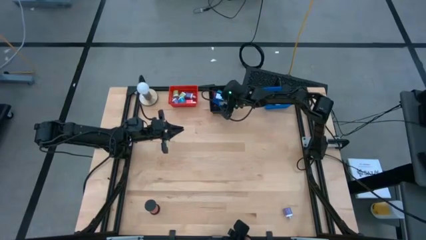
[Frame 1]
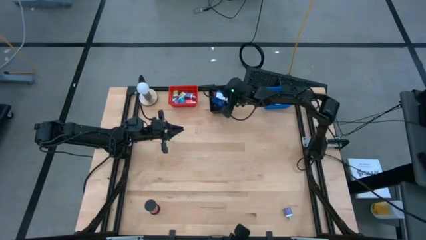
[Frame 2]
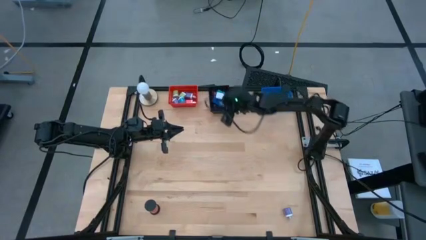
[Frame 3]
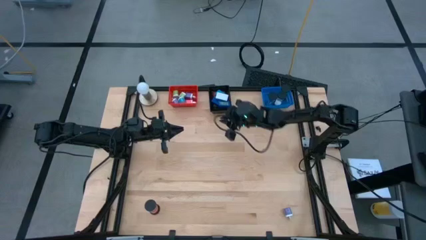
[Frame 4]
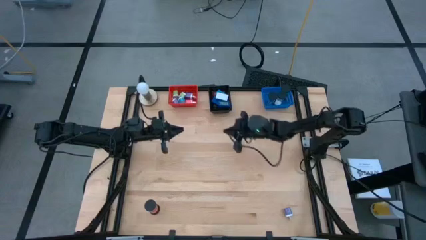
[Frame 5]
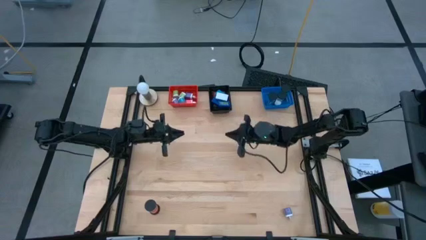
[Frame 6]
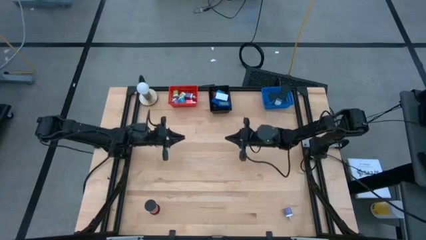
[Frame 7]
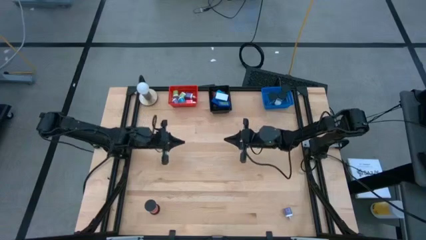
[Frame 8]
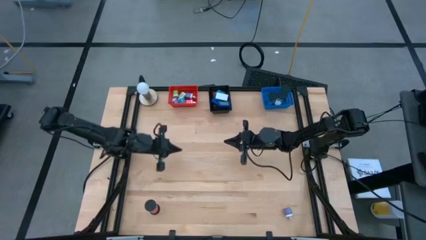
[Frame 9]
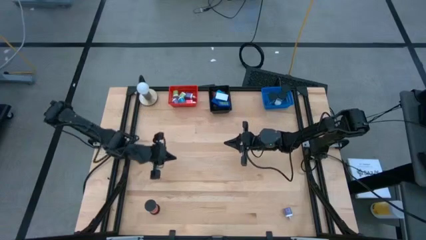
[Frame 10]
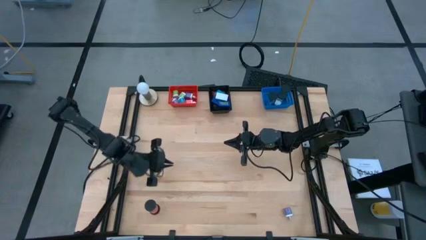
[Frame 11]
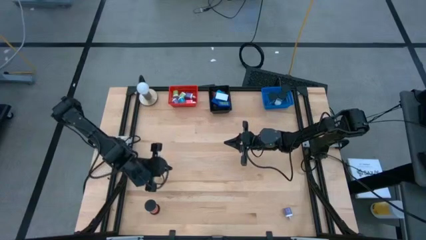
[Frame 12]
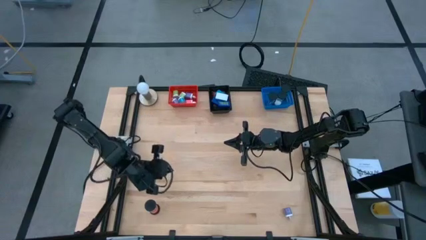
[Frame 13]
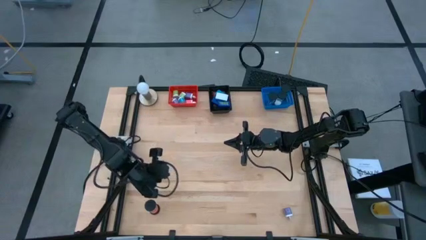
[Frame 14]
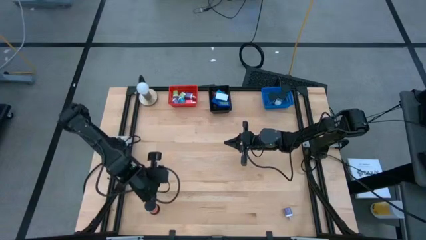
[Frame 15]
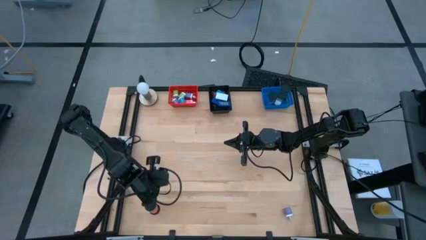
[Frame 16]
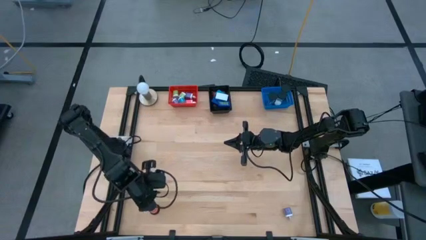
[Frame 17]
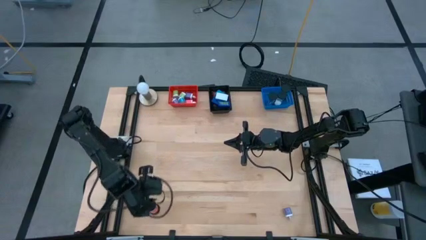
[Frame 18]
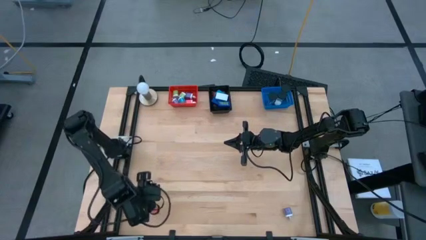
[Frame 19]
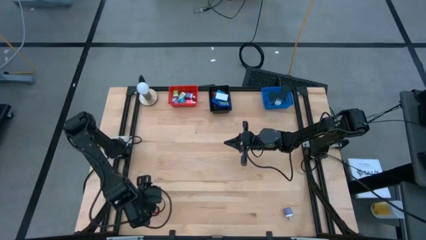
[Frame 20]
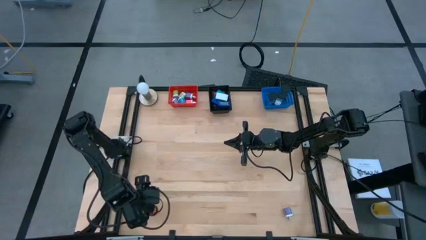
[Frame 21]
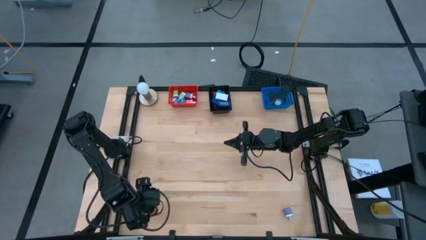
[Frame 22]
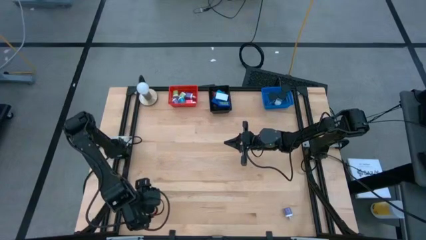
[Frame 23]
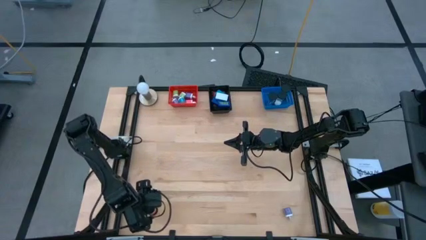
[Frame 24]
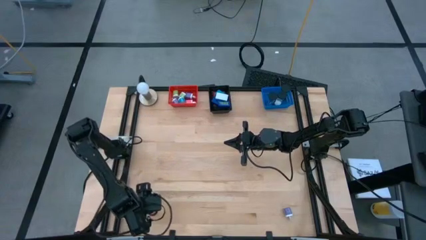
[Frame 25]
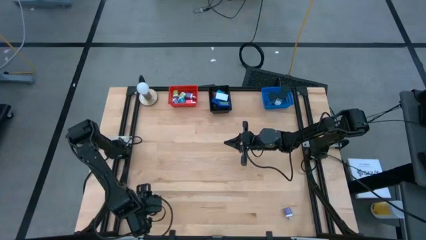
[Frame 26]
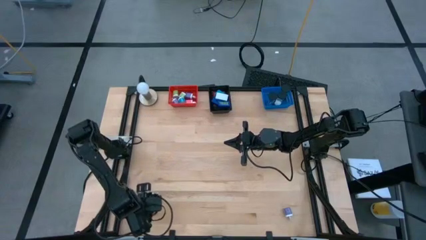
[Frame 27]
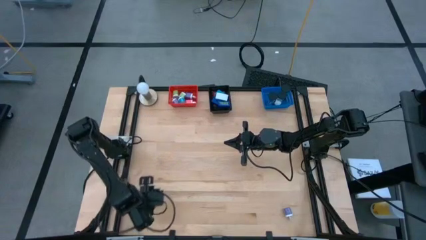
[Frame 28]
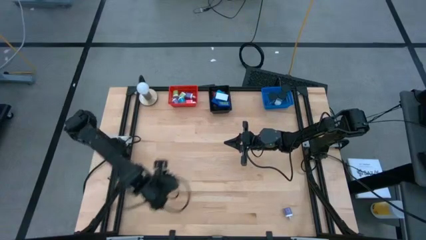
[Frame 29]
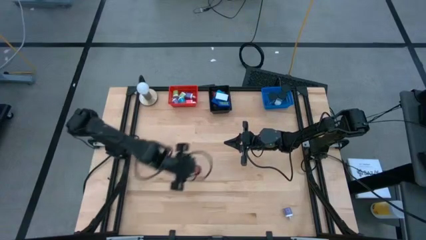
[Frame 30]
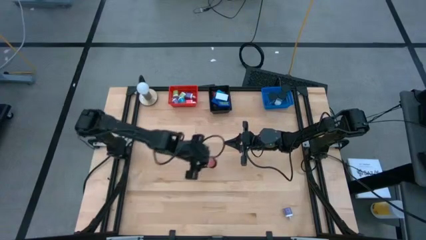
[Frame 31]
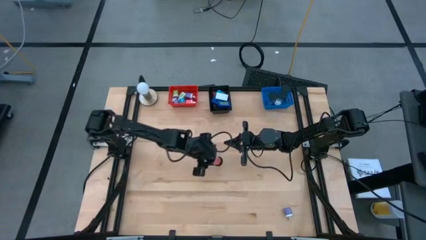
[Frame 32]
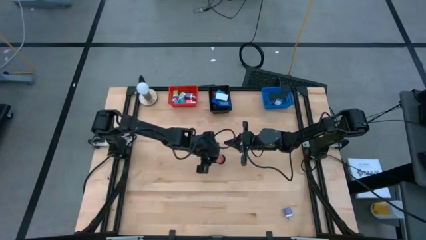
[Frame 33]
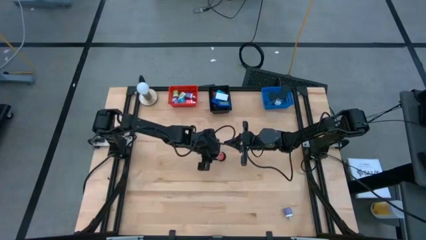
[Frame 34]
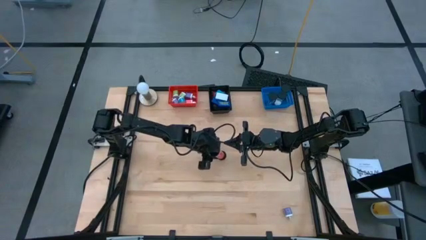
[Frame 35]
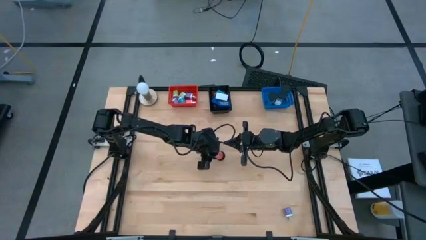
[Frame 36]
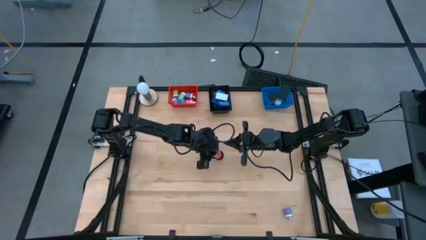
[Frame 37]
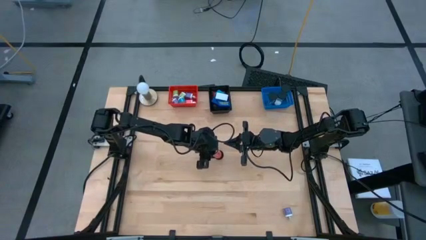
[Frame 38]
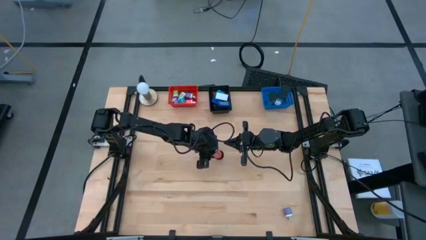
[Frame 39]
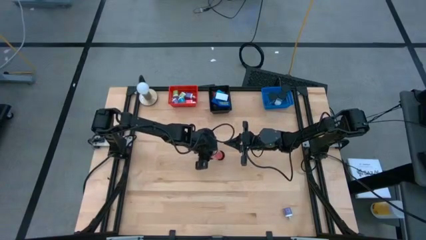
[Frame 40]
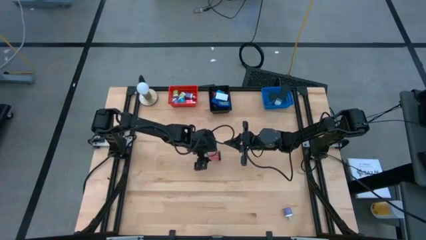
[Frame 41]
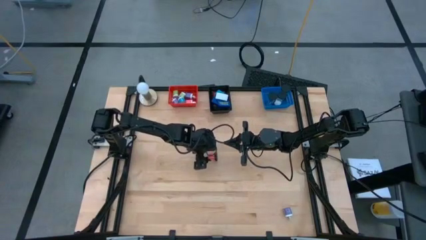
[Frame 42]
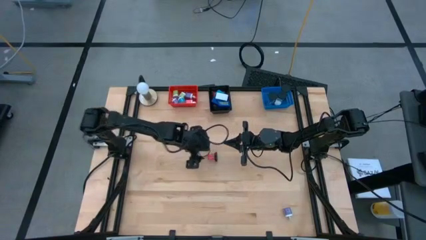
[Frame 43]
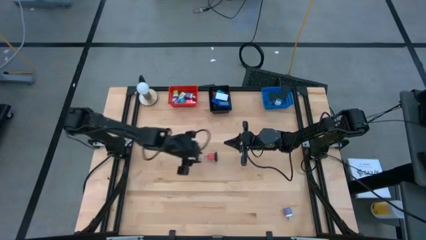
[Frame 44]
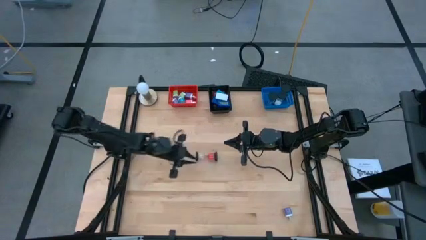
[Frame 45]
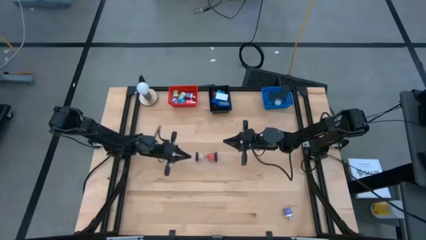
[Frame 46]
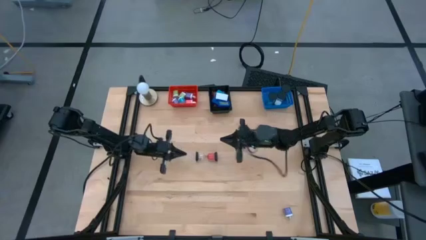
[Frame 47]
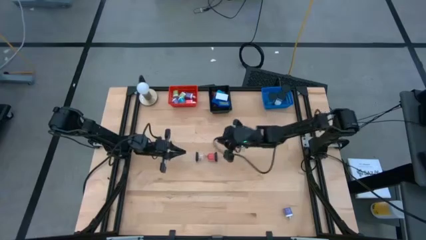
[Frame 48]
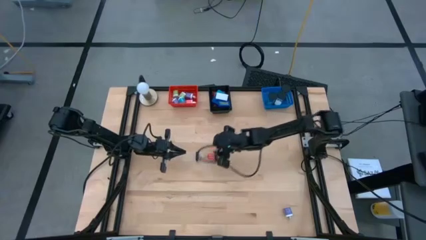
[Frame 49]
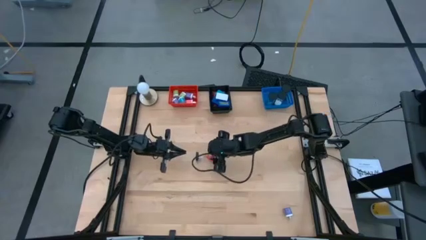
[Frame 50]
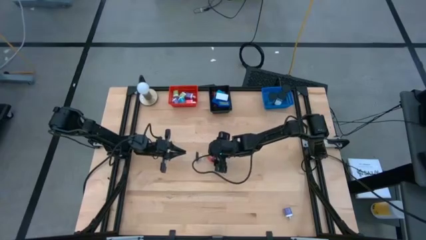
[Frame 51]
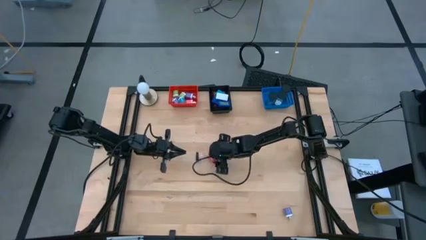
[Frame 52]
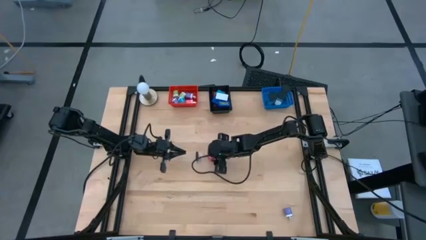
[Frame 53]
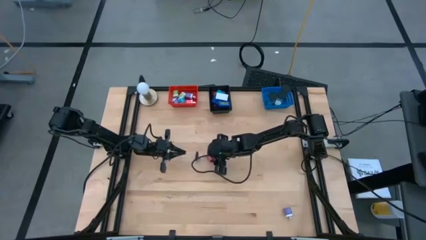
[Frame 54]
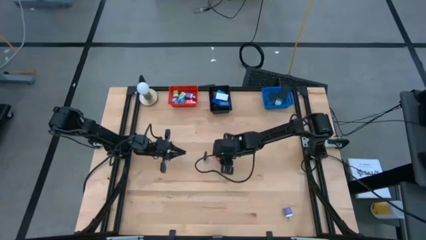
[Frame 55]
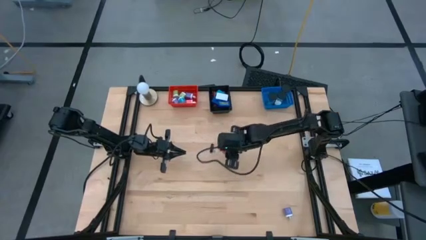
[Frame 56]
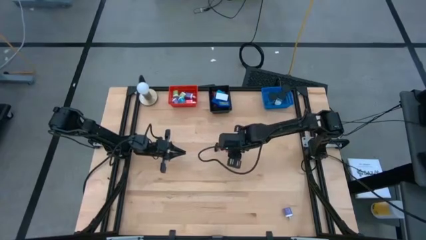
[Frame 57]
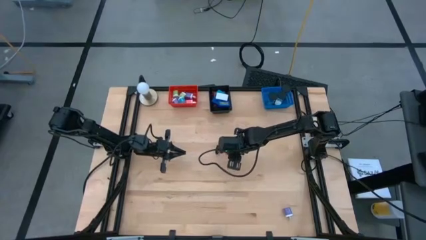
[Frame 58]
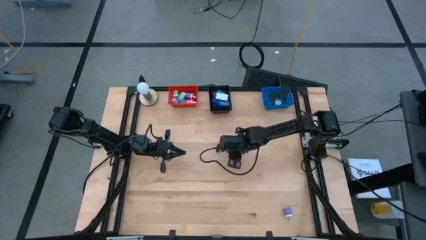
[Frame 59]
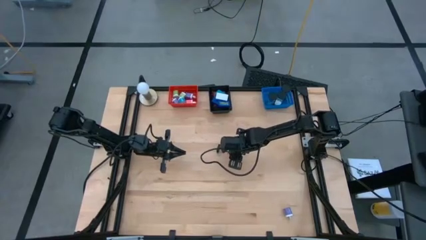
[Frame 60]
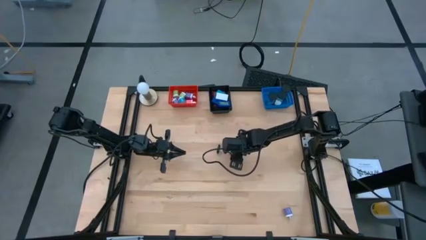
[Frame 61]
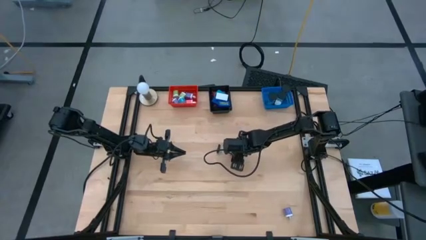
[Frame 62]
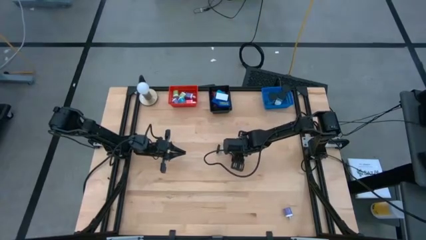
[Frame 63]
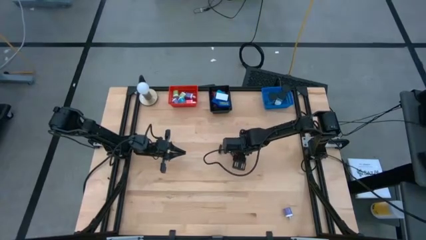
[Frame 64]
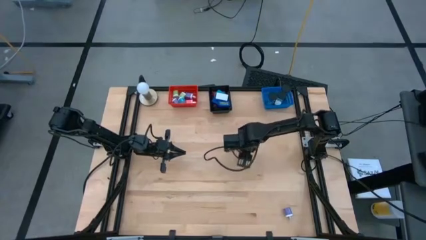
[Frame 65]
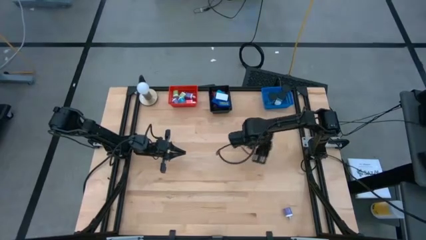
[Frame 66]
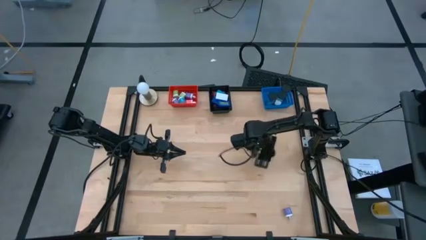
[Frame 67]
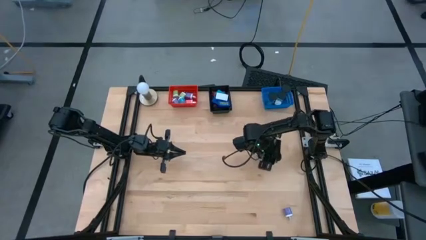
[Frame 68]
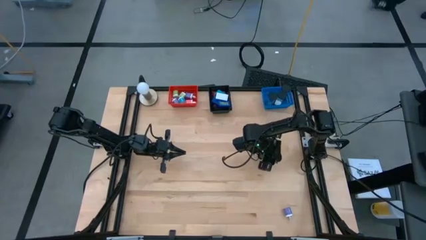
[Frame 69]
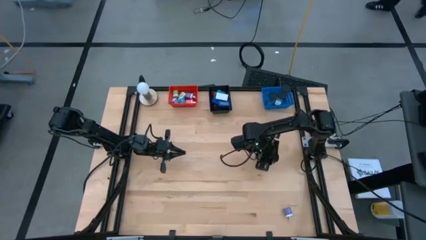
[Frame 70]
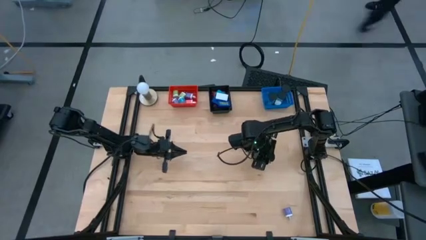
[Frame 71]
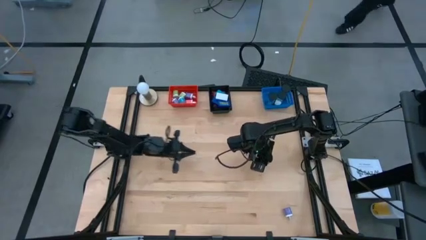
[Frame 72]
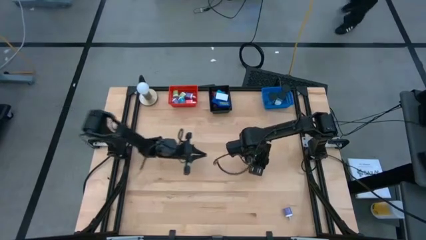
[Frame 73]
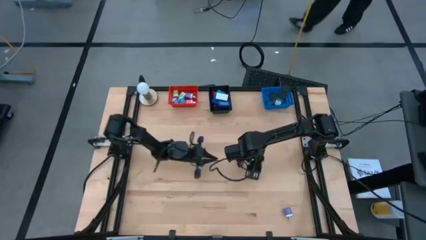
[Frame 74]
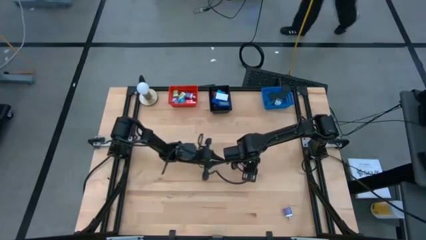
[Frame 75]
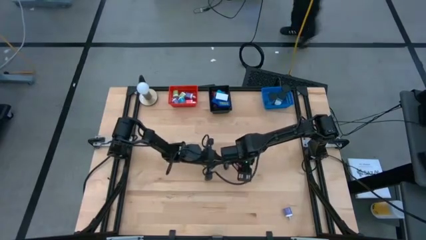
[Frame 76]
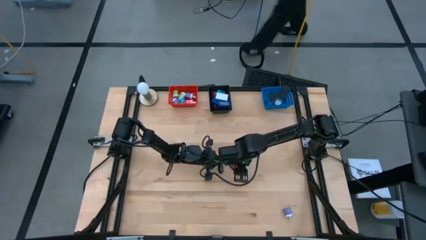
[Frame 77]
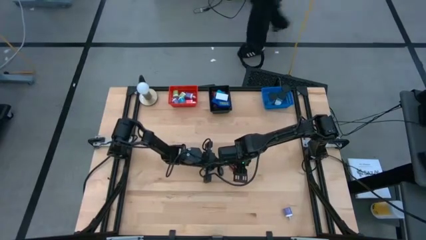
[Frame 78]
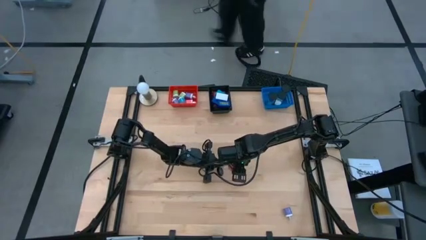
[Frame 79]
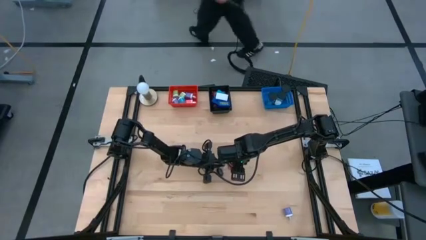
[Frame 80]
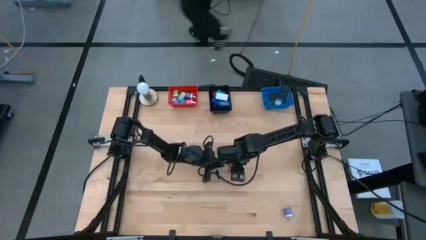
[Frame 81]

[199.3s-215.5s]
Task: Pick & Place Office items
Put the pink hourglass into the blue bin
